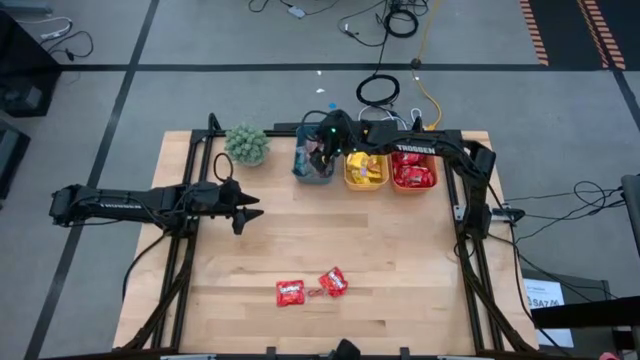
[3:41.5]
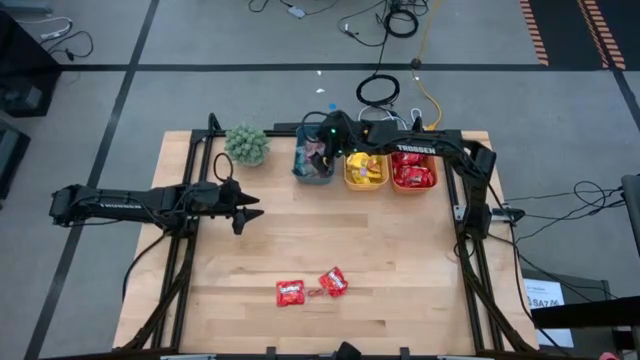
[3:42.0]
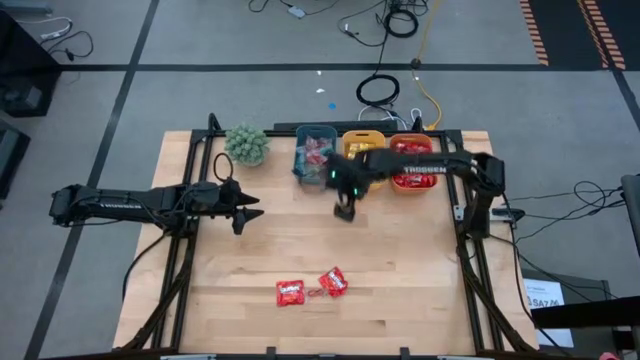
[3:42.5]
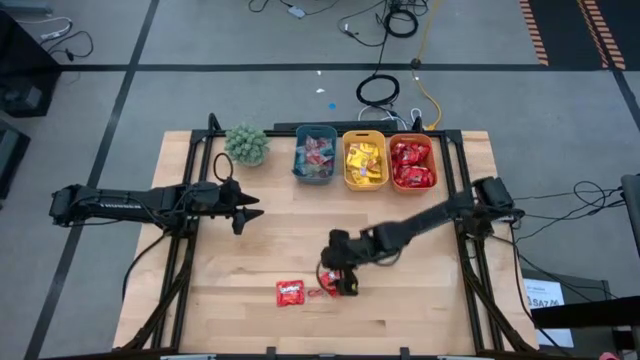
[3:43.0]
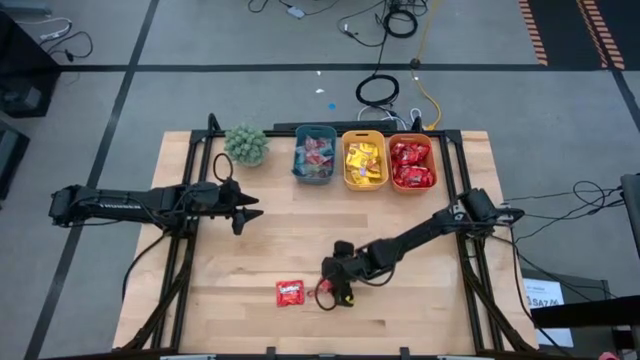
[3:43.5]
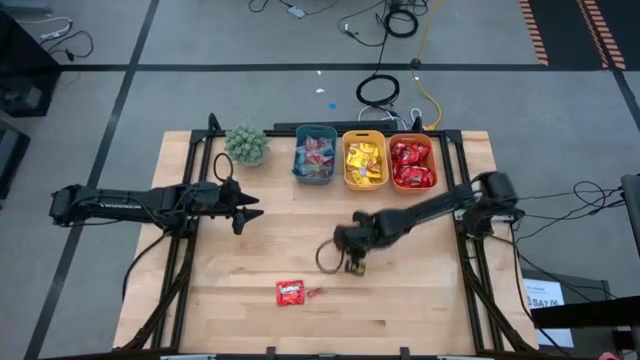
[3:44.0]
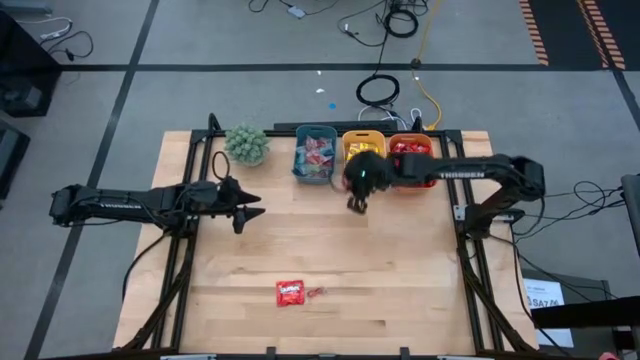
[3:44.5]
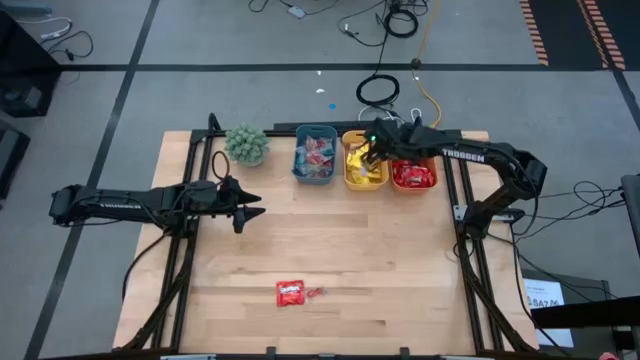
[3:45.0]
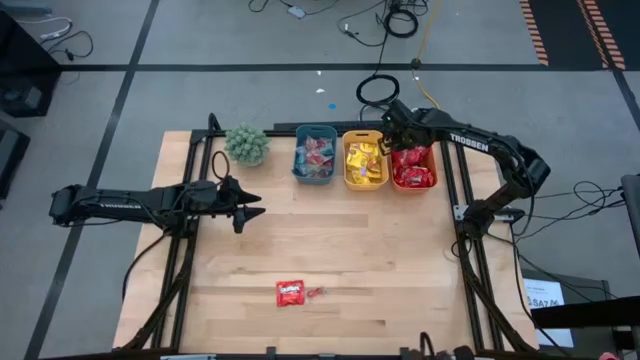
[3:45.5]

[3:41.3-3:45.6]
Task: Sort candy
Put the red candy into the orange bin

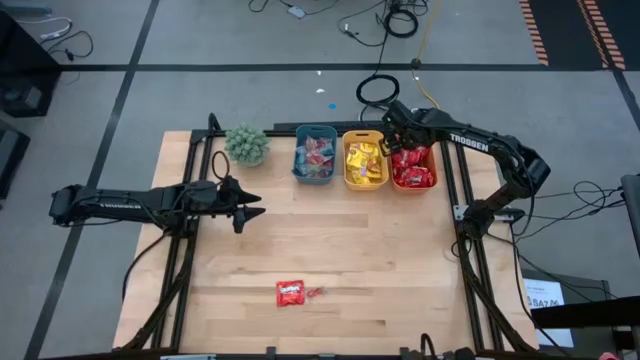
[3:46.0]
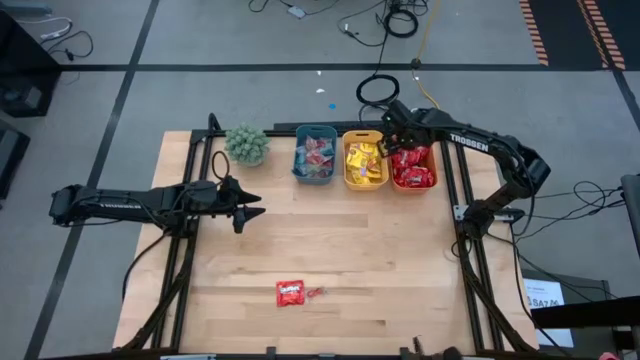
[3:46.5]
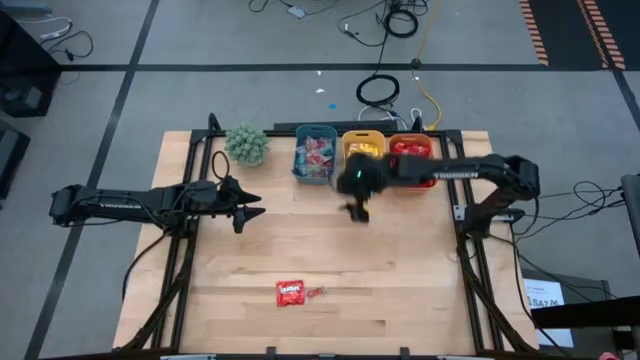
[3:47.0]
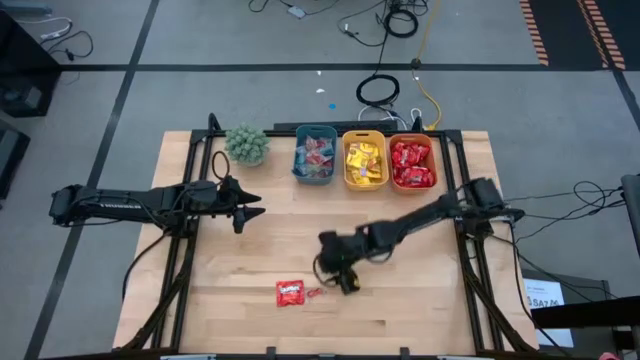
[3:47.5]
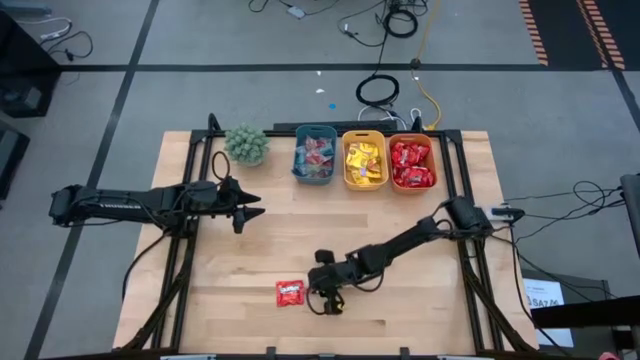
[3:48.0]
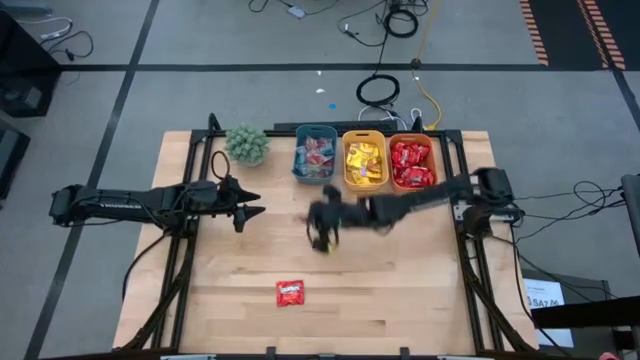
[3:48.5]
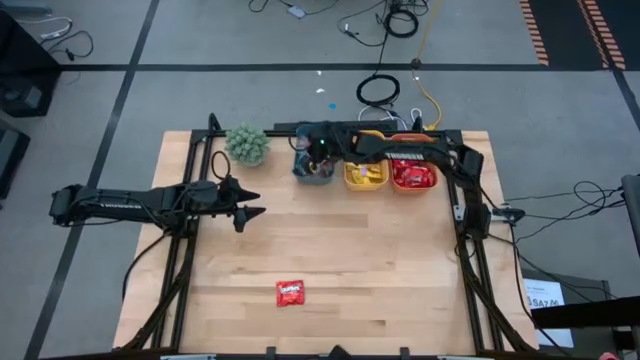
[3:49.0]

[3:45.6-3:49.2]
Put the orange gummy into the blue bin

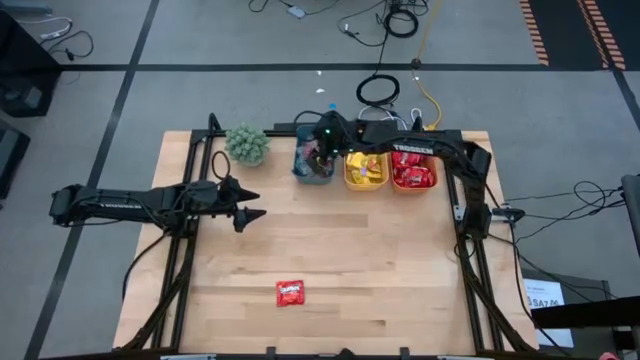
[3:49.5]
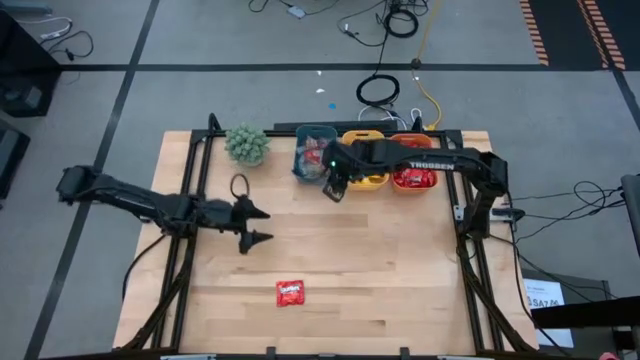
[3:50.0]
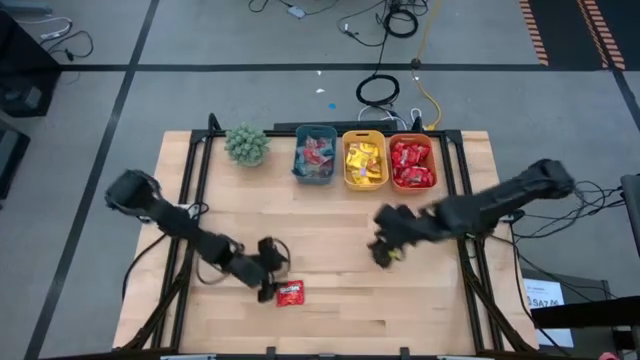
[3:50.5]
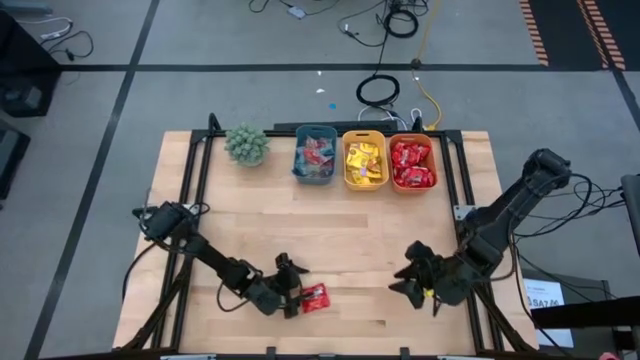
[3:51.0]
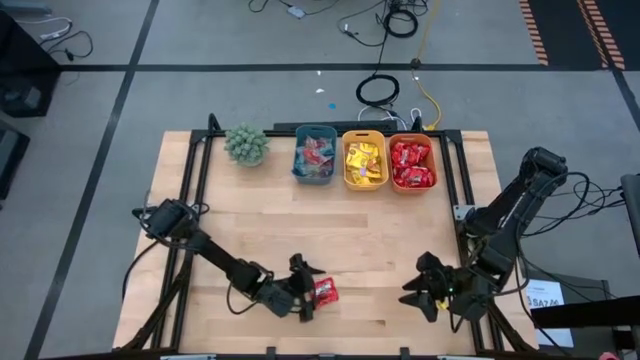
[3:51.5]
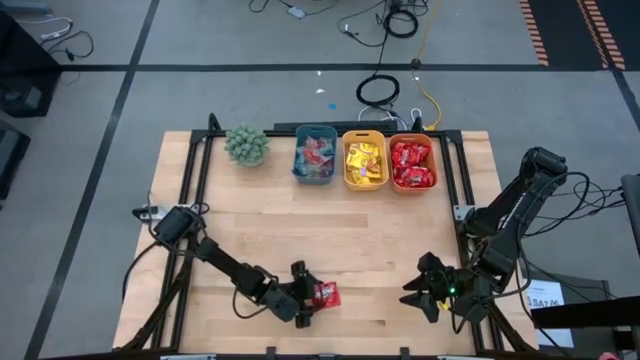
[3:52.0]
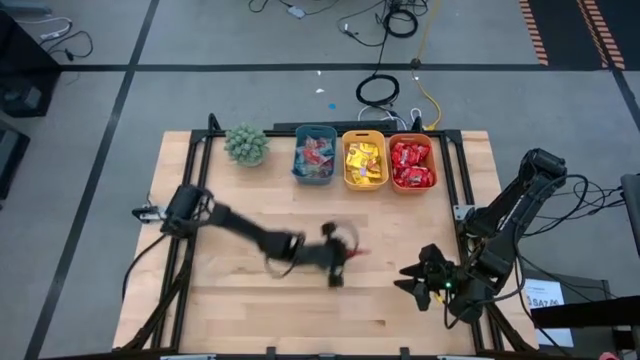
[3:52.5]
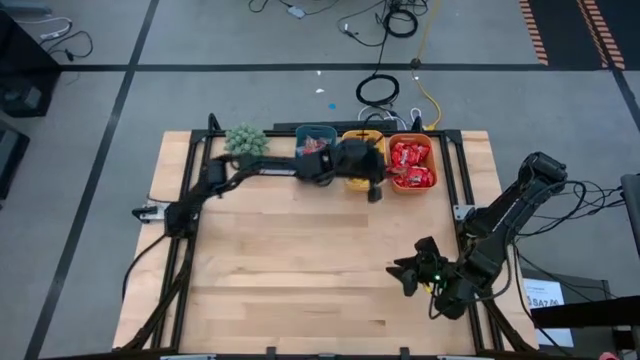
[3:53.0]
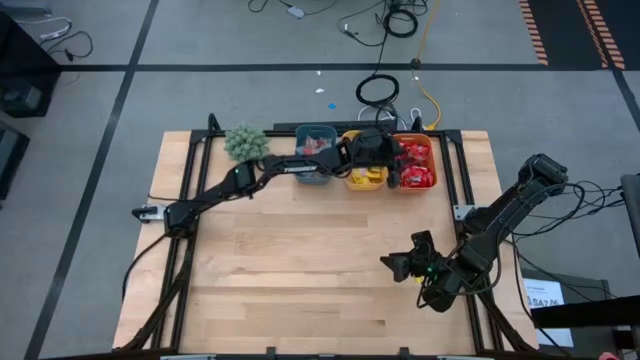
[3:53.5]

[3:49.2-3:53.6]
Put the red candy into the orange bin

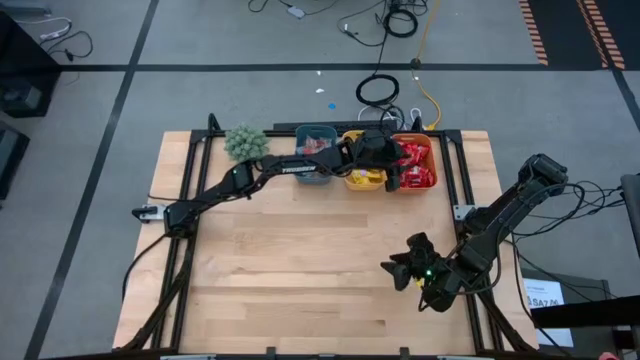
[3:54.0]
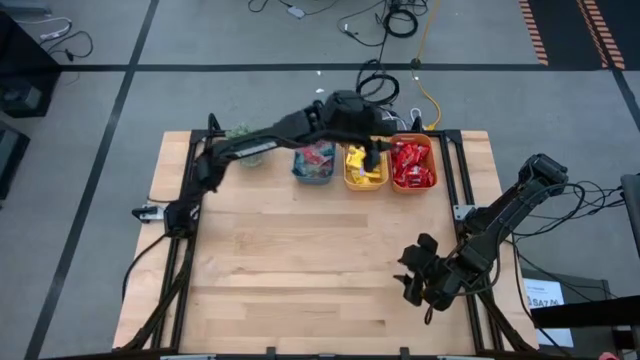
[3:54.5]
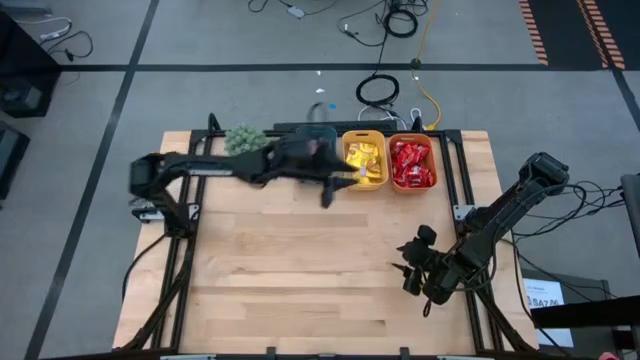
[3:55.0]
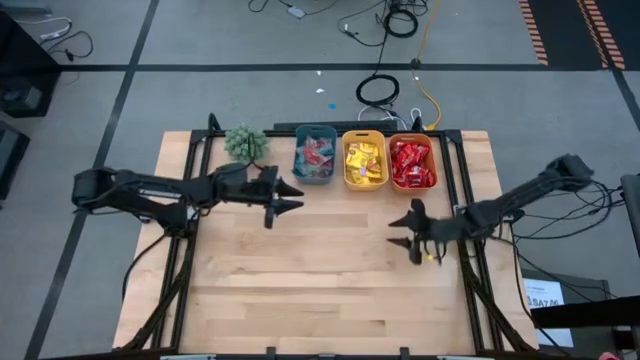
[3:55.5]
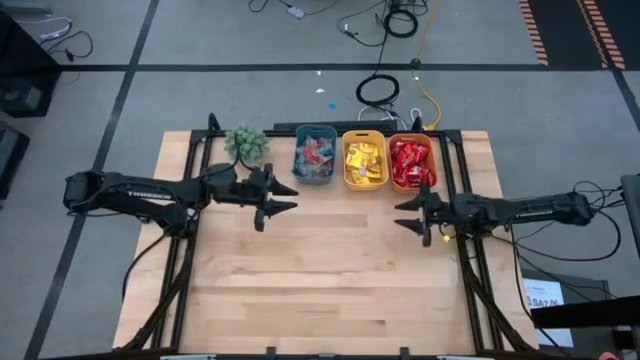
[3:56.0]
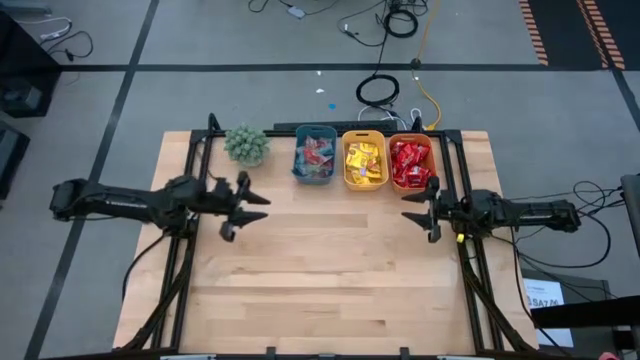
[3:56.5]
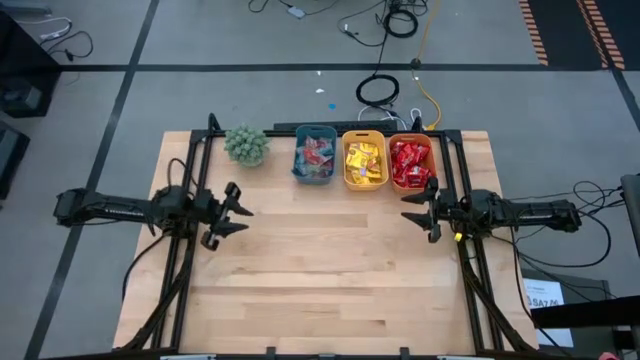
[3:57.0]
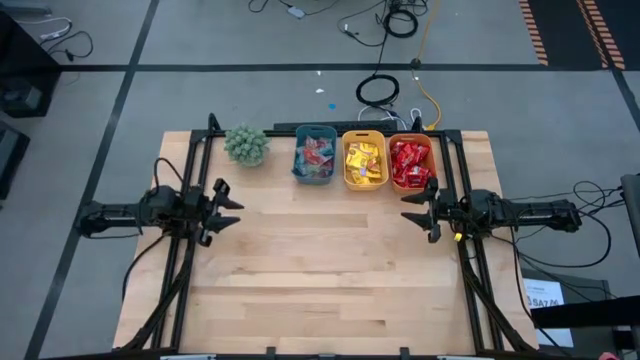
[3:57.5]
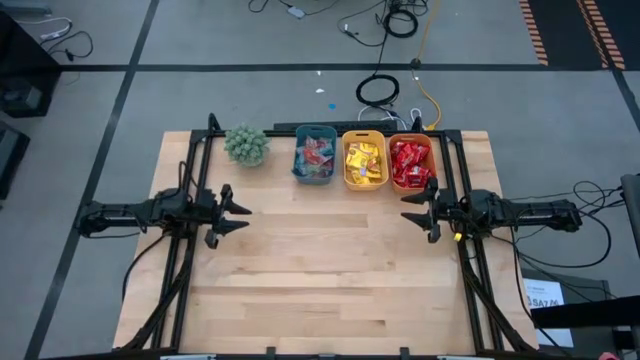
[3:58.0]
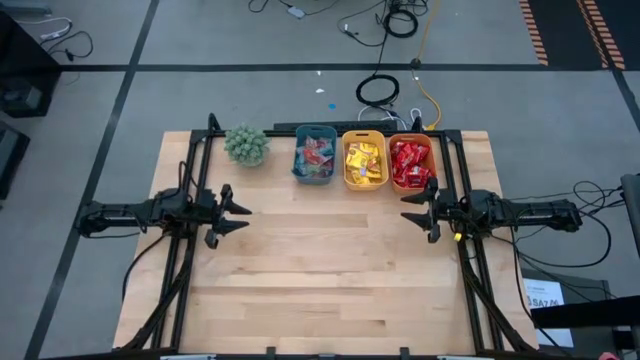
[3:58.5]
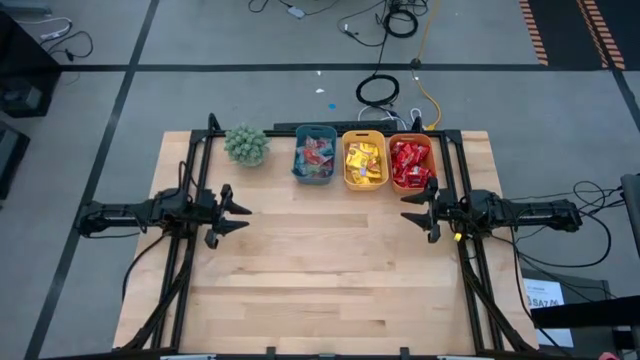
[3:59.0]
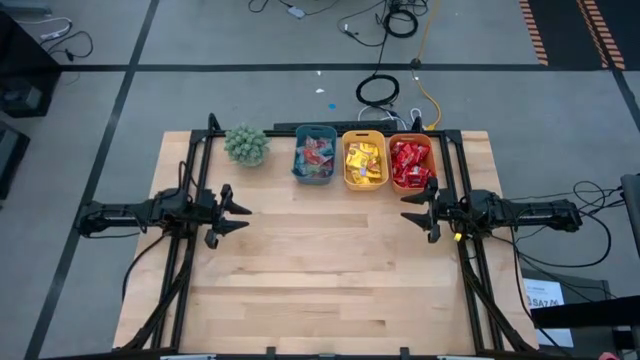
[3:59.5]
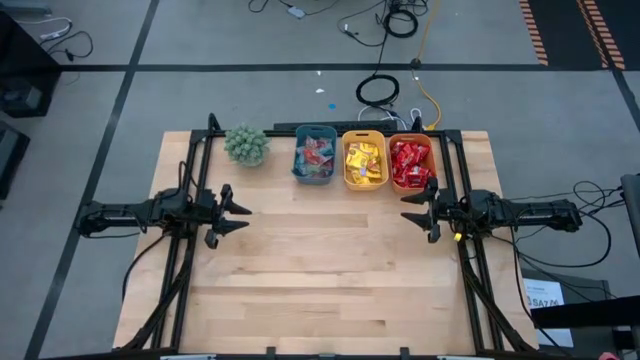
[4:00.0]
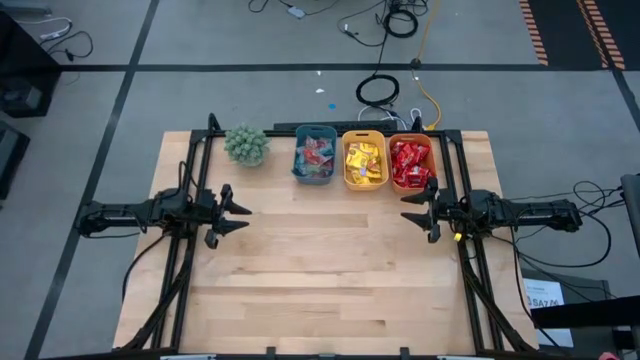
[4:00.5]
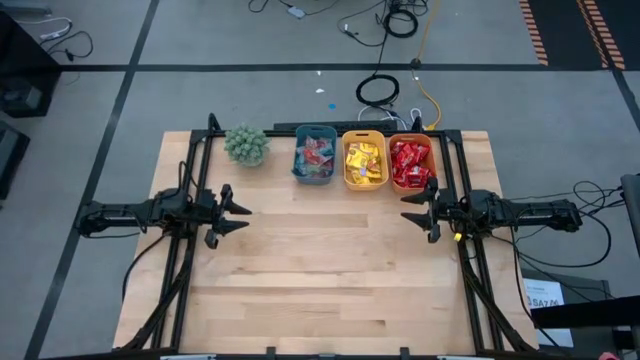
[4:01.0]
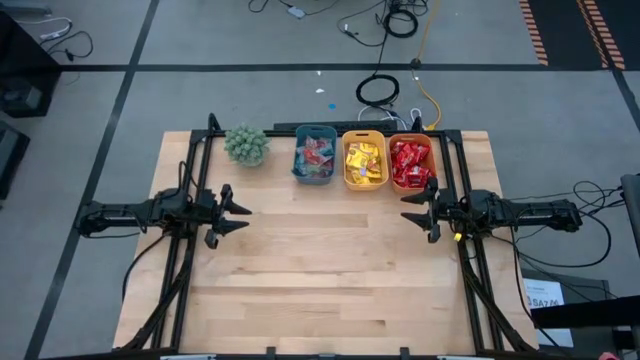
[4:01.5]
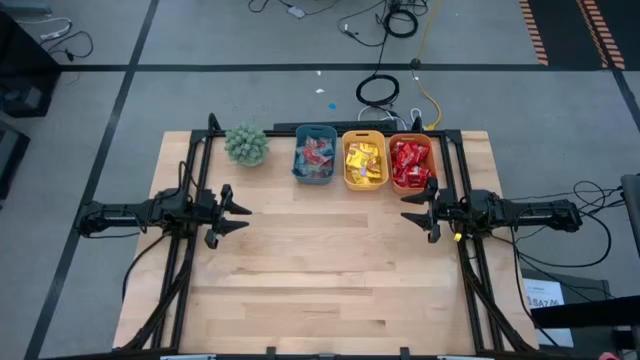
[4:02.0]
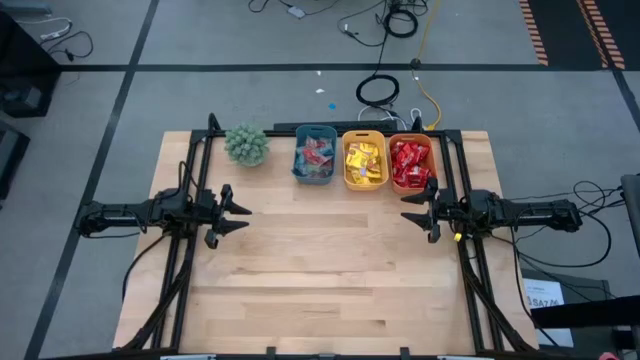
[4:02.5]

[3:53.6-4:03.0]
Return to Home Position
